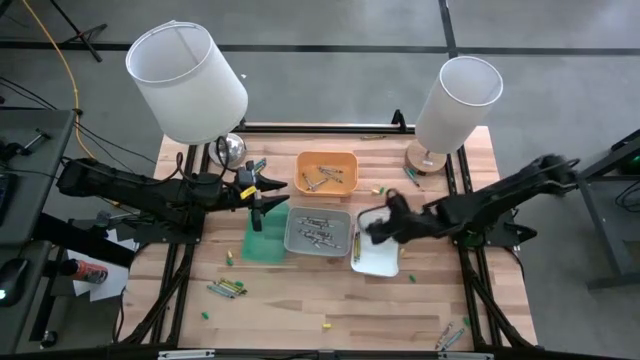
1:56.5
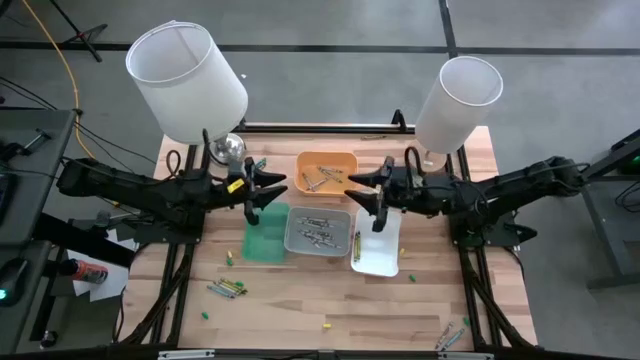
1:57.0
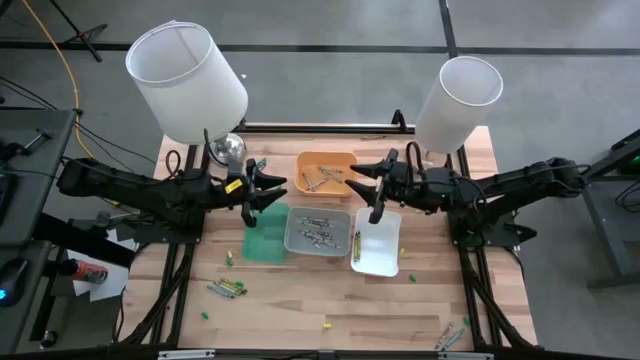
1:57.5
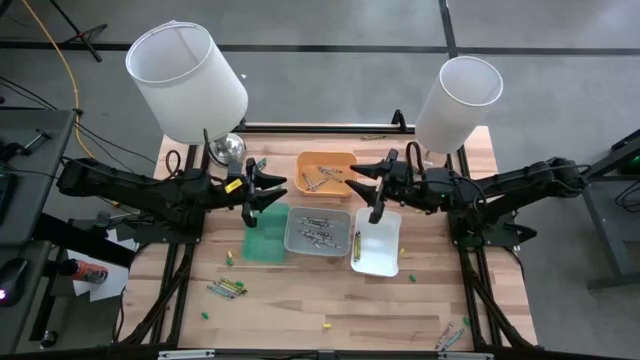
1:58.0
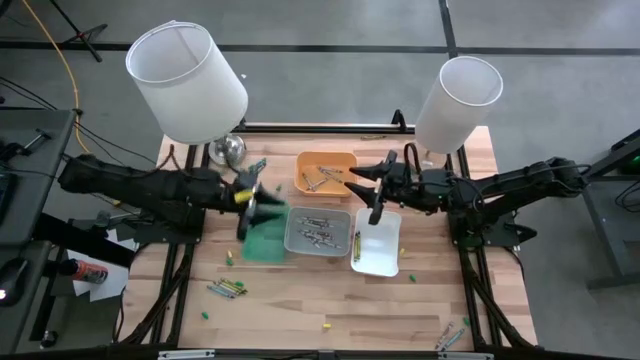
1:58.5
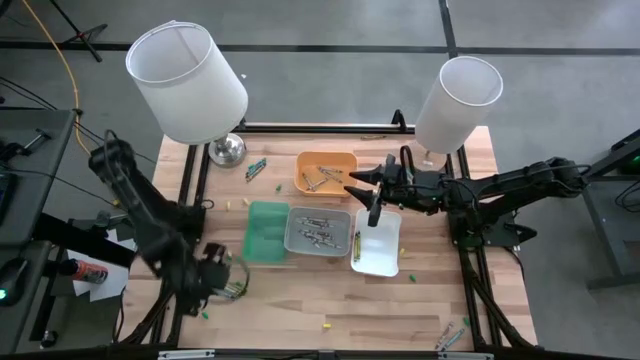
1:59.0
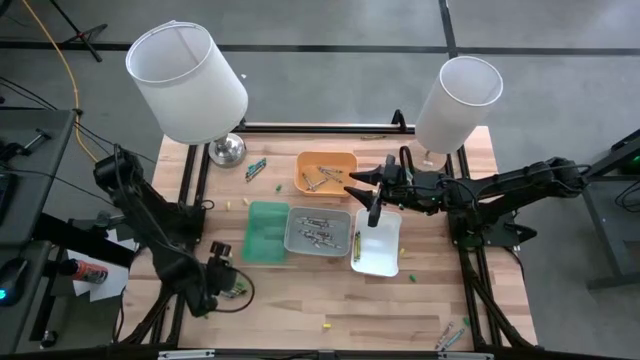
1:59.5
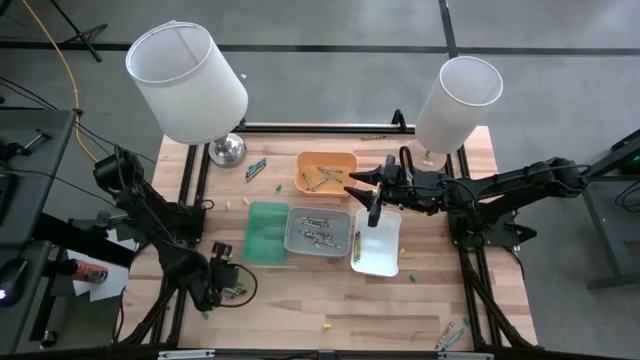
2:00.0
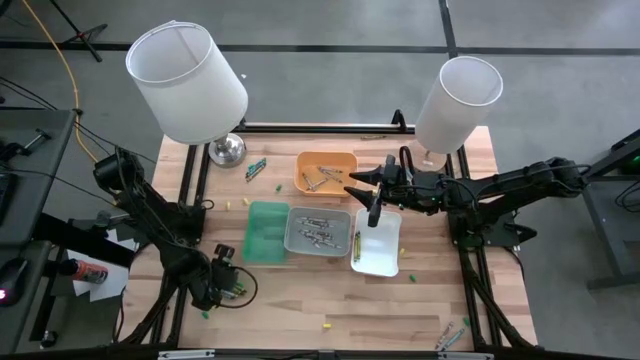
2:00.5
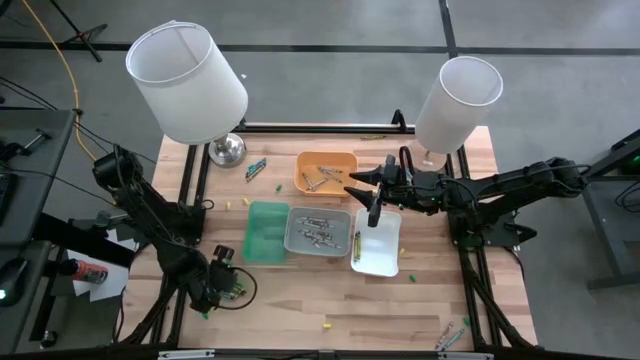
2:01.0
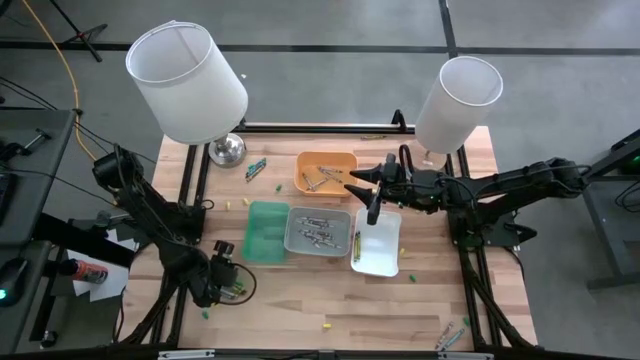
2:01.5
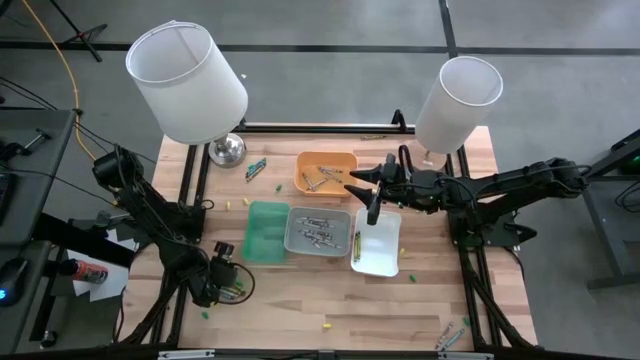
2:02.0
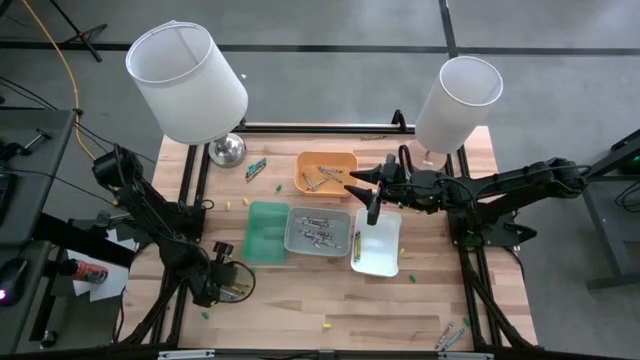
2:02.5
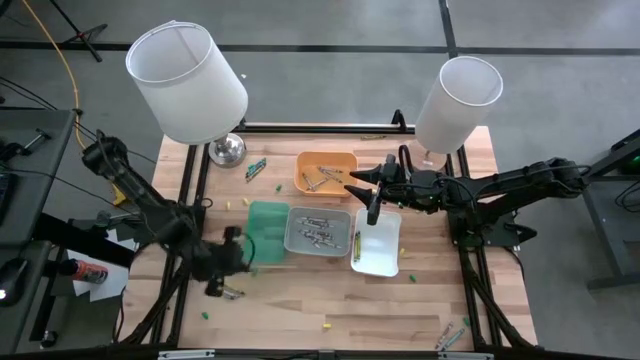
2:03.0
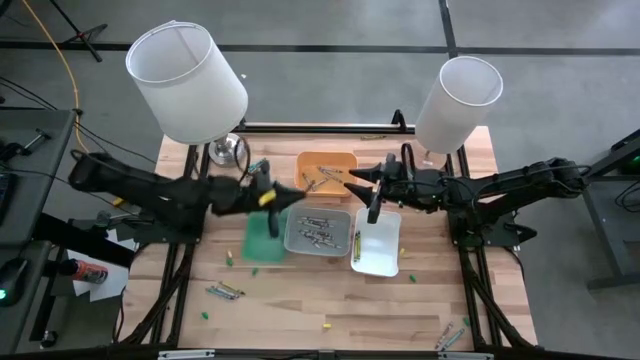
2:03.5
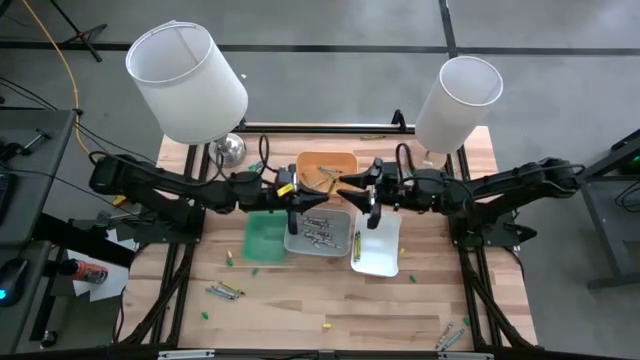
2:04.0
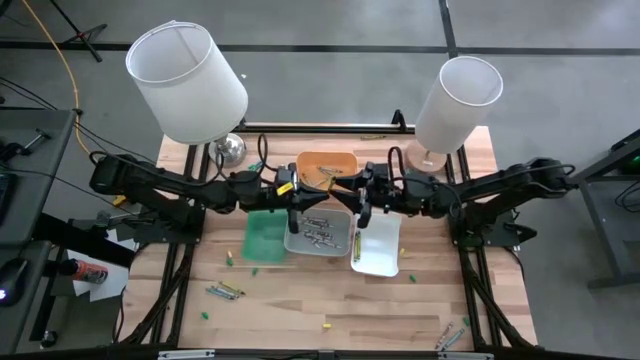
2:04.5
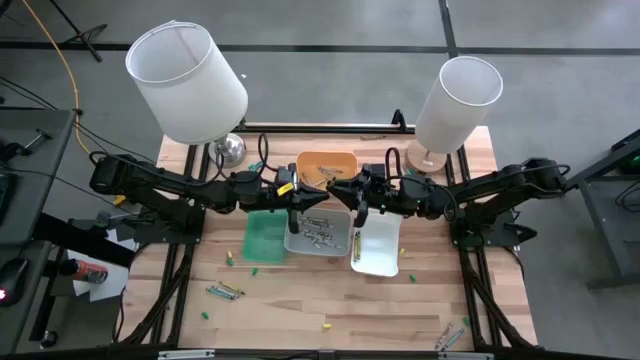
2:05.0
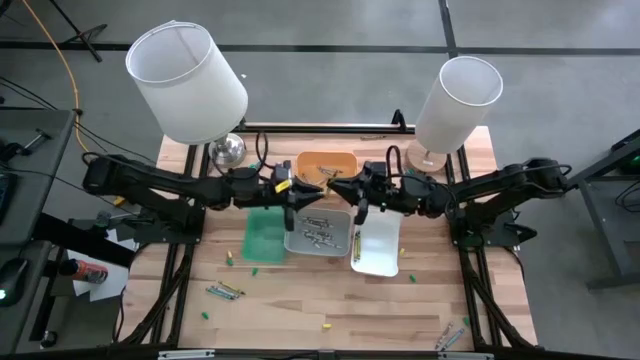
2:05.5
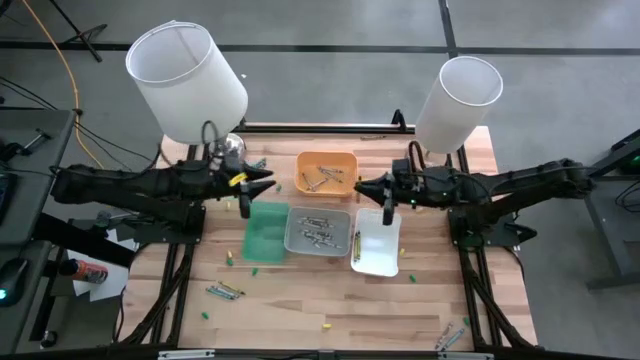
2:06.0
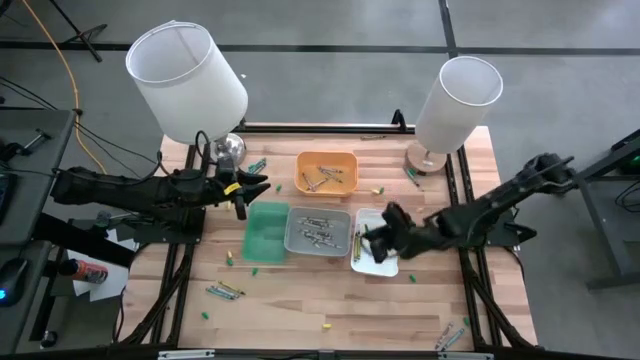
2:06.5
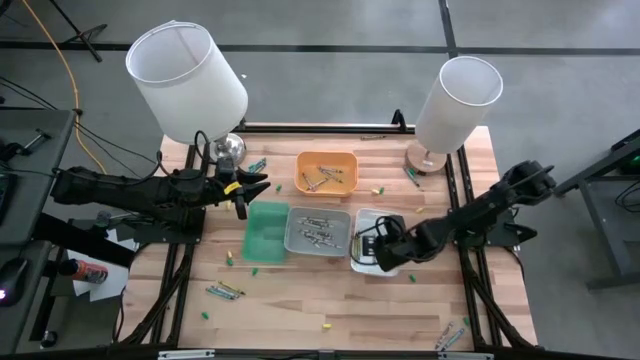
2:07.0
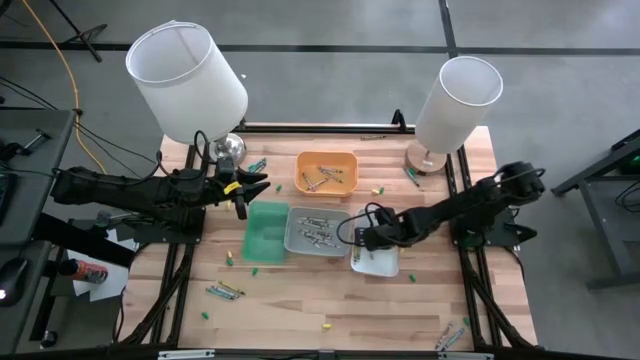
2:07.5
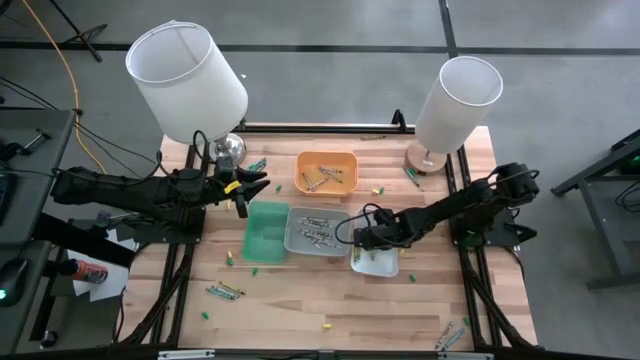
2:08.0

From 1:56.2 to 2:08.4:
Task: Sort crayons
Put the green crayon into the white bin

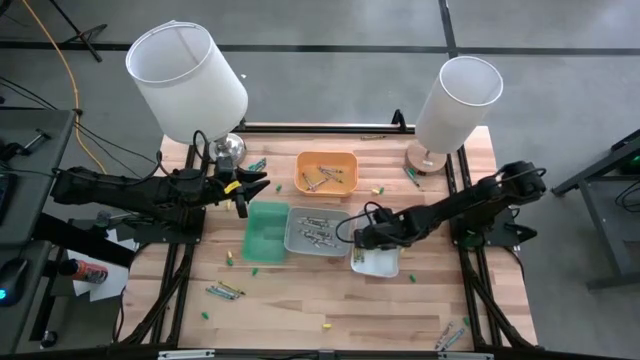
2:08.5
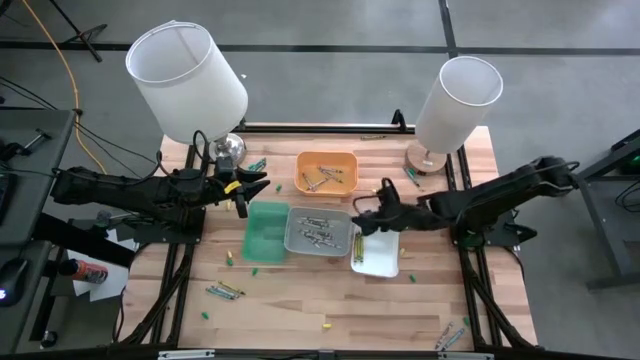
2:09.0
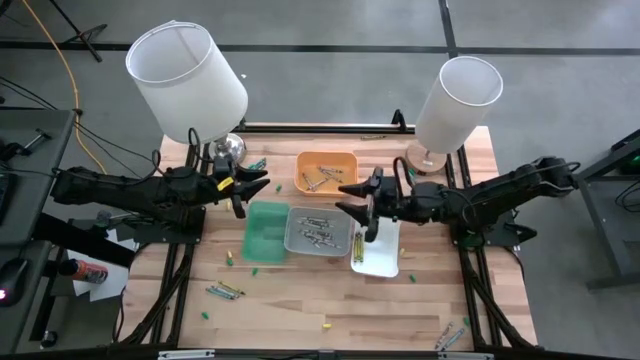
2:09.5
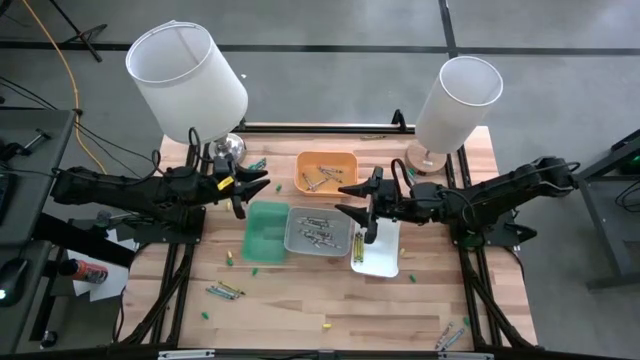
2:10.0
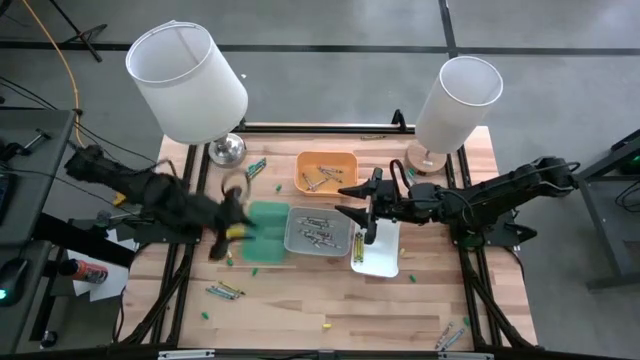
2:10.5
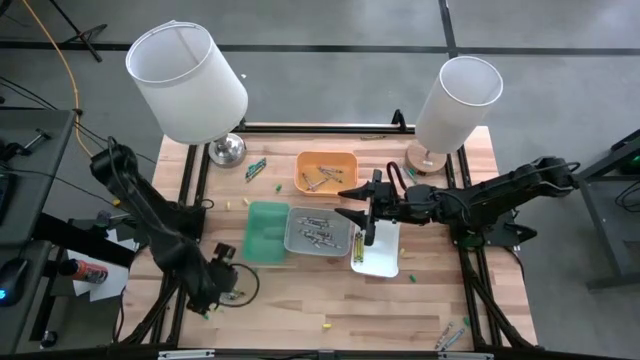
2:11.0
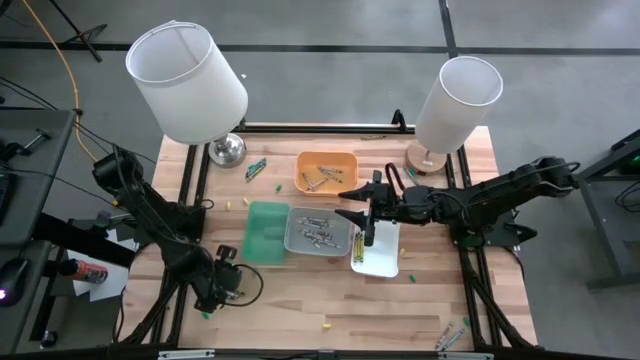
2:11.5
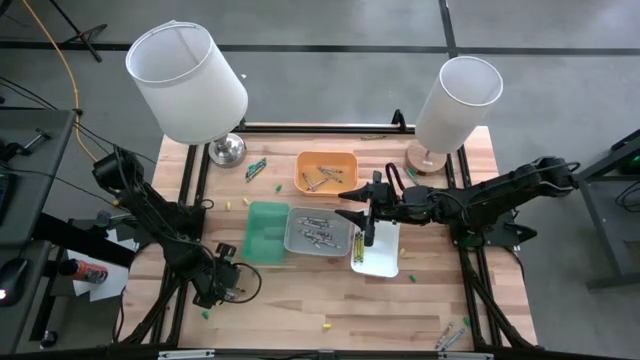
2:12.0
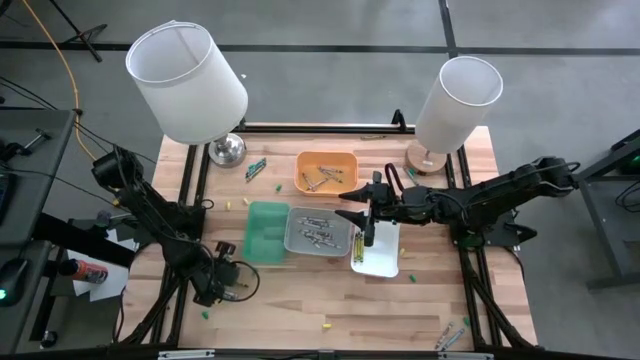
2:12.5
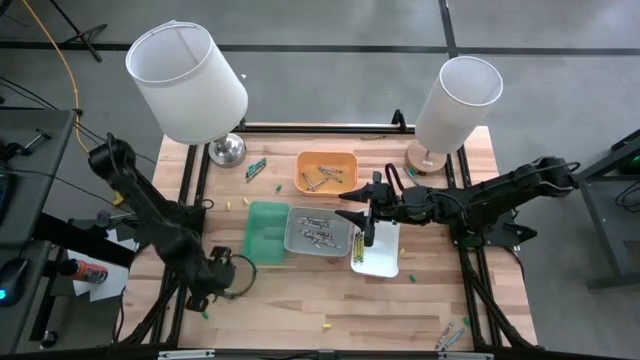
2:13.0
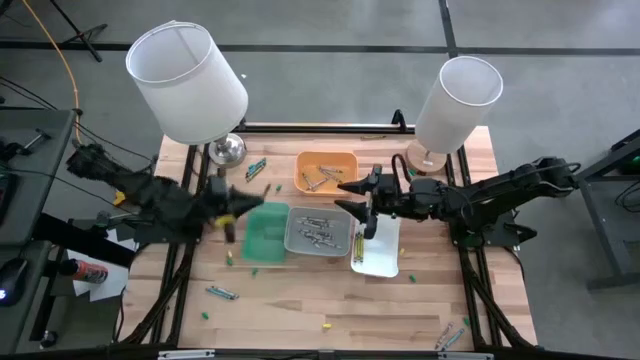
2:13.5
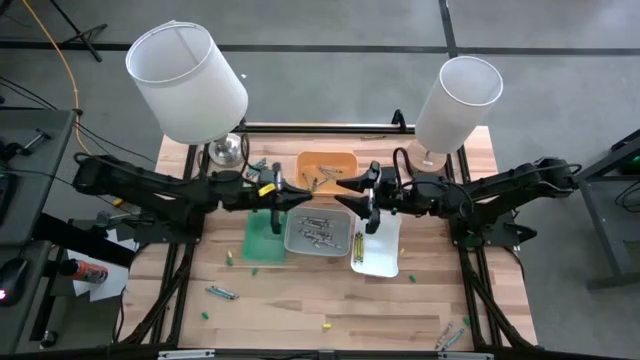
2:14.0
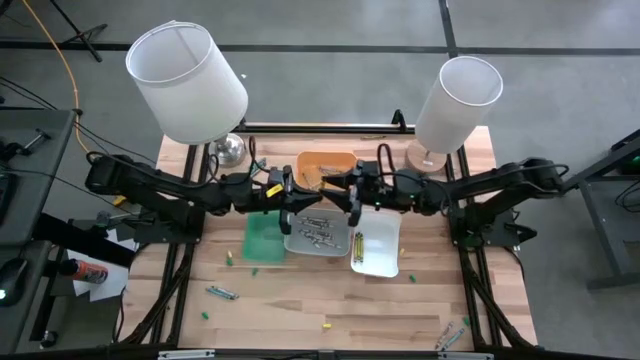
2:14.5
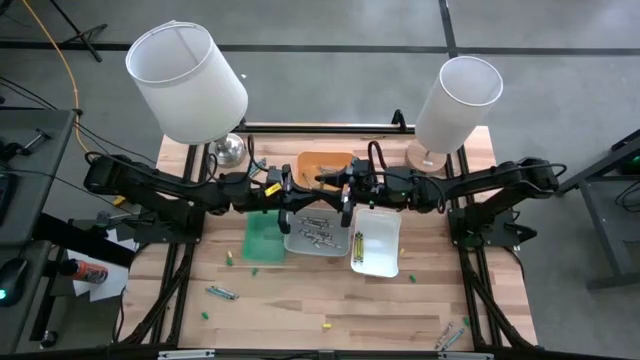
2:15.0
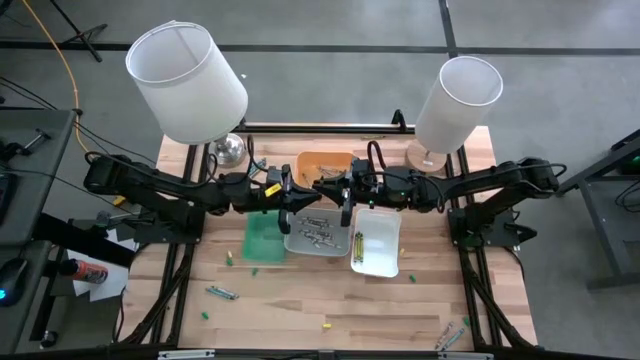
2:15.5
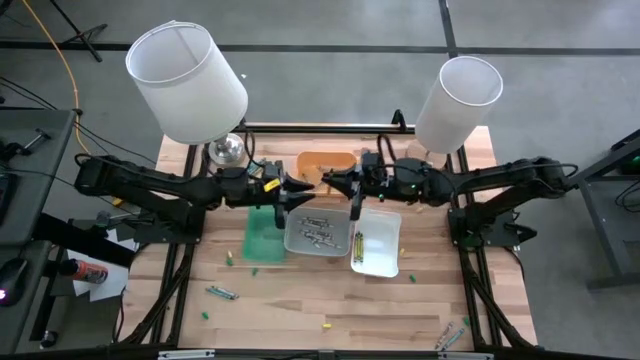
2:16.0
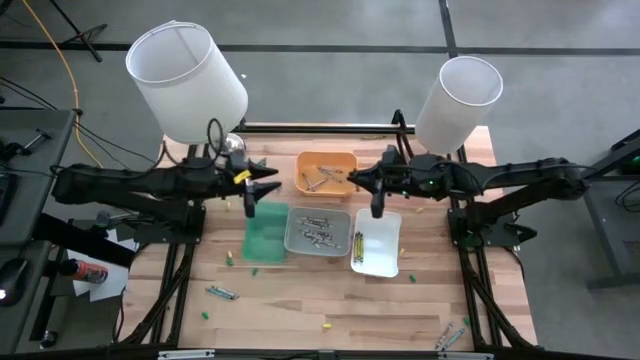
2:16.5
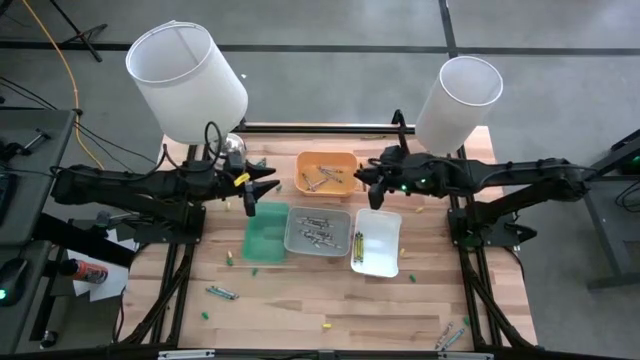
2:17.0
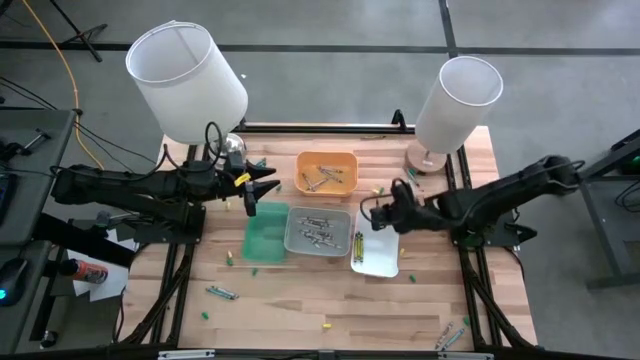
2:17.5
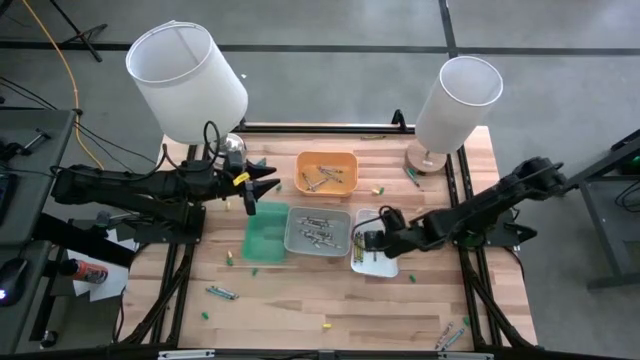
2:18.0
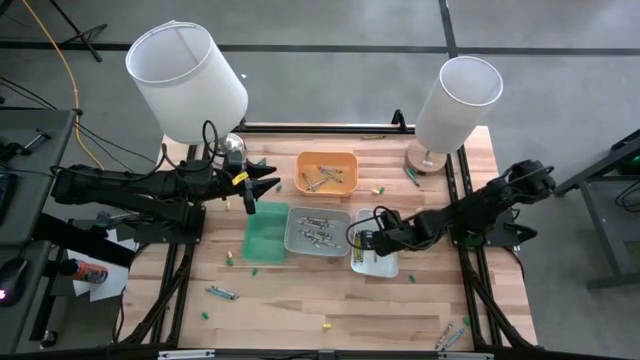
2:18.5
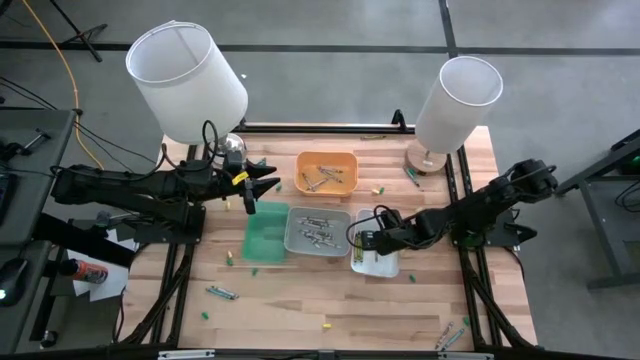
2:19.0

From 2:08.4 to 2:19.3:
Put the green crayon into the white bin
